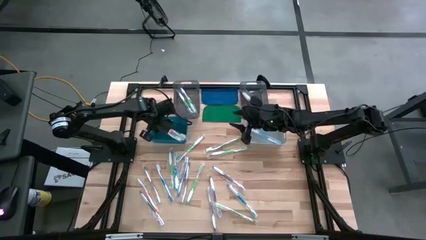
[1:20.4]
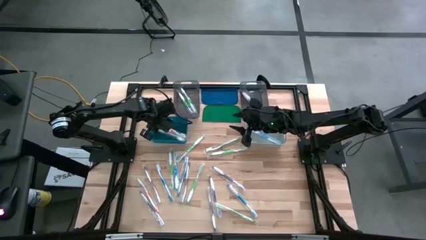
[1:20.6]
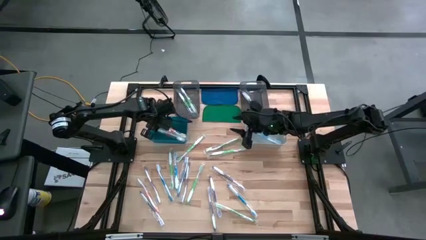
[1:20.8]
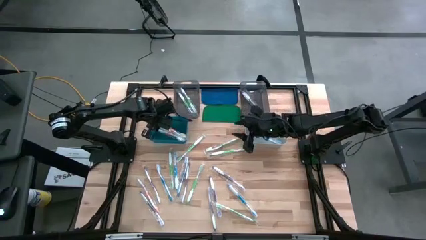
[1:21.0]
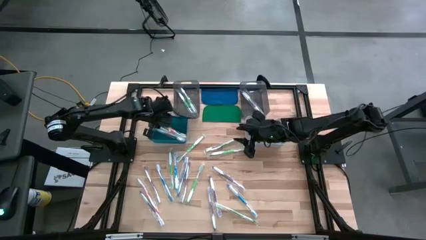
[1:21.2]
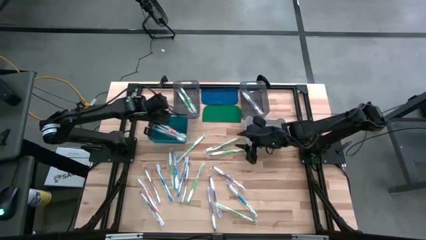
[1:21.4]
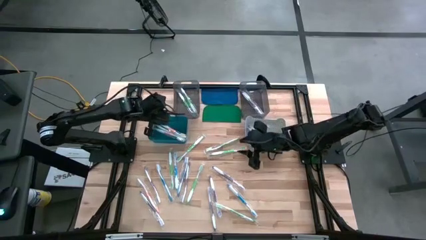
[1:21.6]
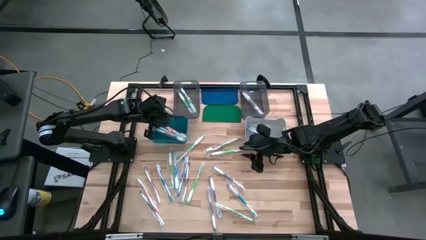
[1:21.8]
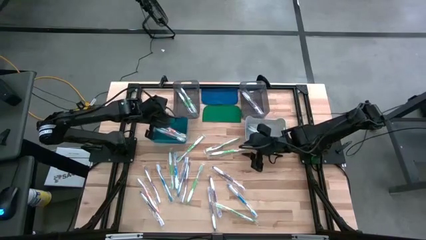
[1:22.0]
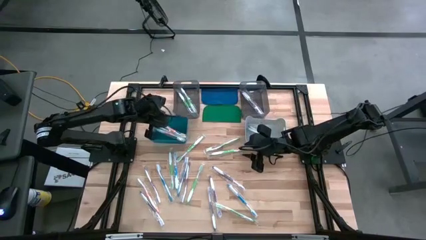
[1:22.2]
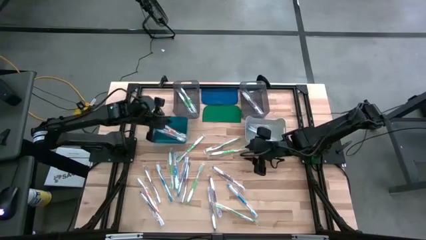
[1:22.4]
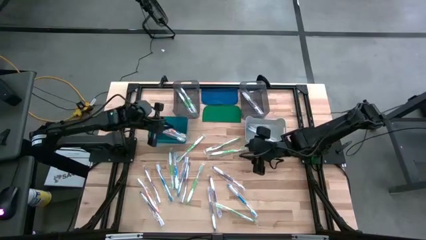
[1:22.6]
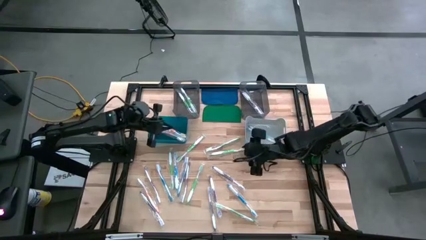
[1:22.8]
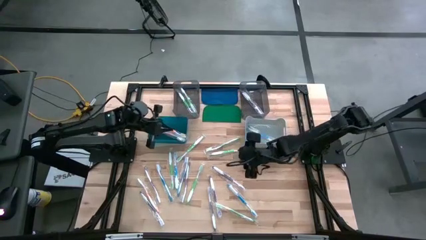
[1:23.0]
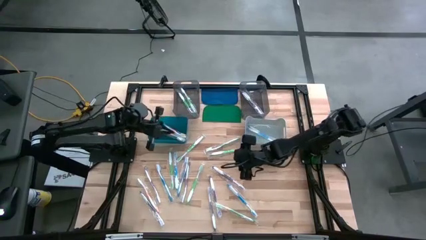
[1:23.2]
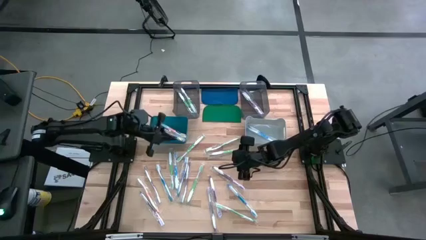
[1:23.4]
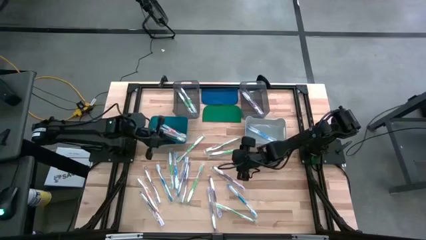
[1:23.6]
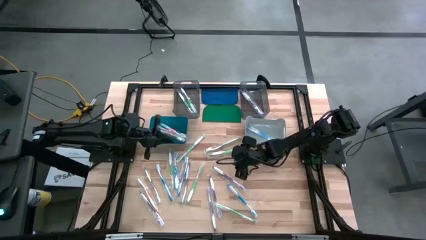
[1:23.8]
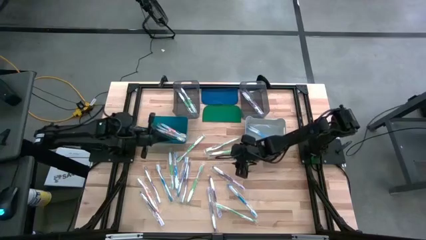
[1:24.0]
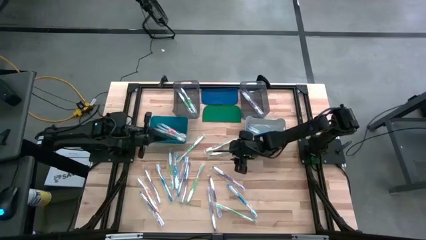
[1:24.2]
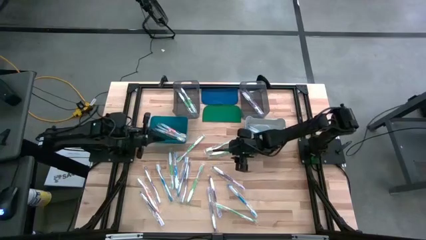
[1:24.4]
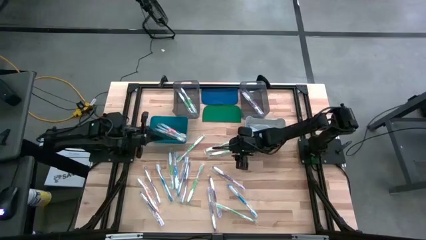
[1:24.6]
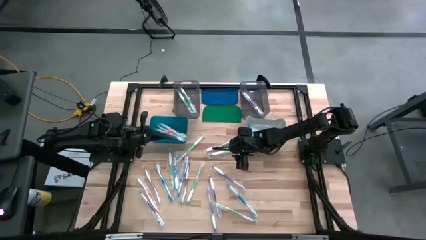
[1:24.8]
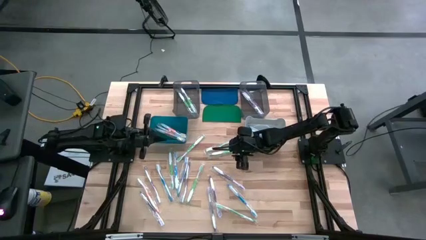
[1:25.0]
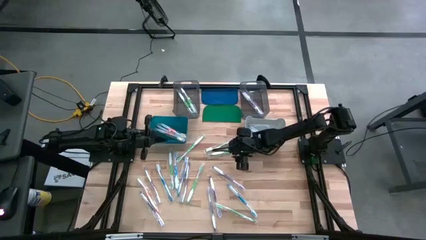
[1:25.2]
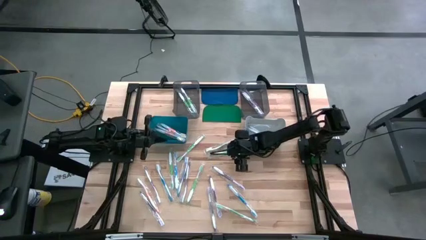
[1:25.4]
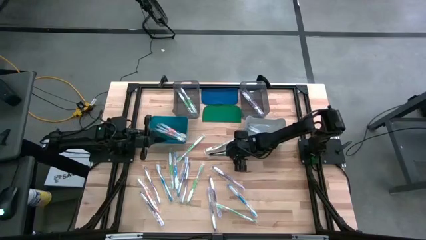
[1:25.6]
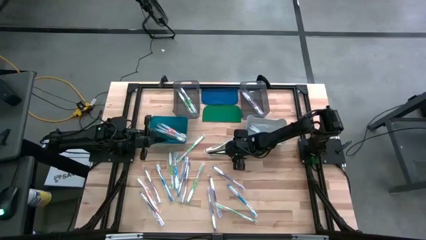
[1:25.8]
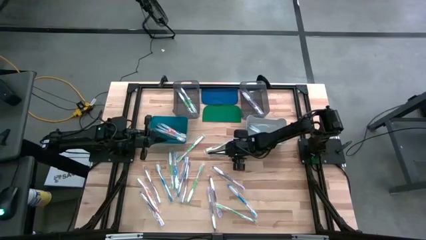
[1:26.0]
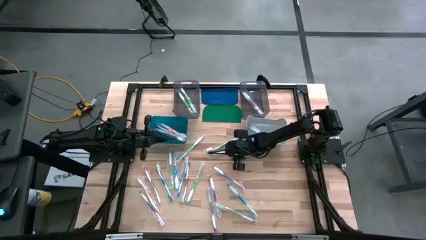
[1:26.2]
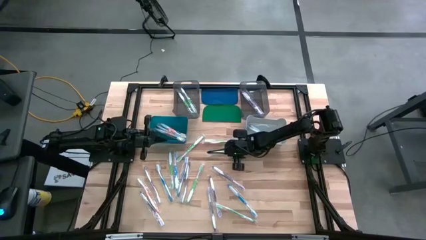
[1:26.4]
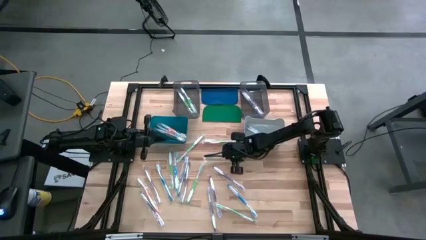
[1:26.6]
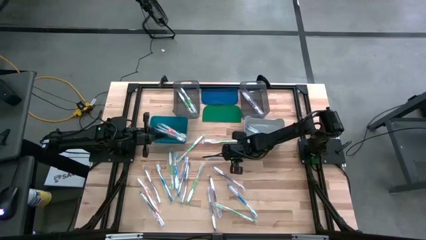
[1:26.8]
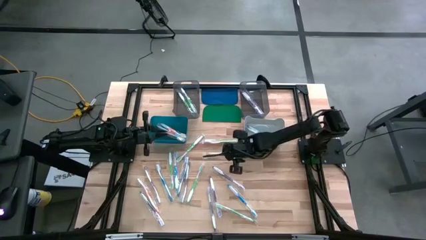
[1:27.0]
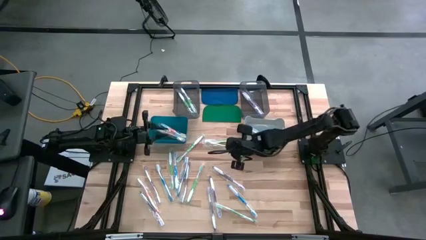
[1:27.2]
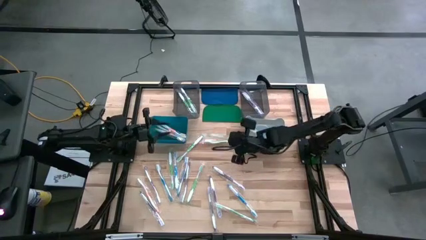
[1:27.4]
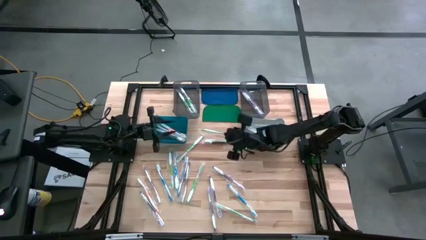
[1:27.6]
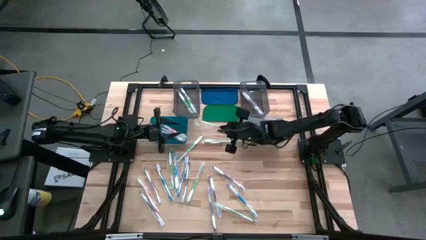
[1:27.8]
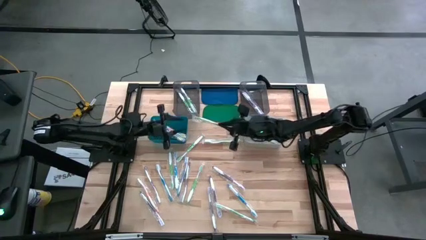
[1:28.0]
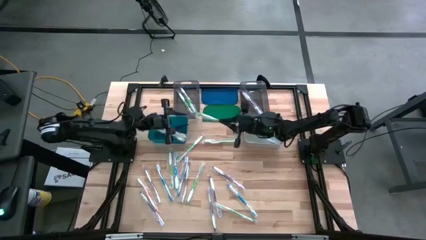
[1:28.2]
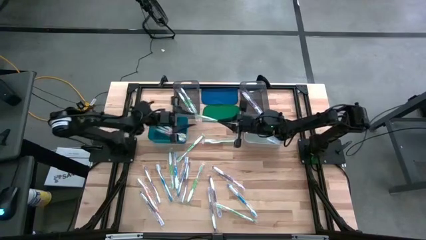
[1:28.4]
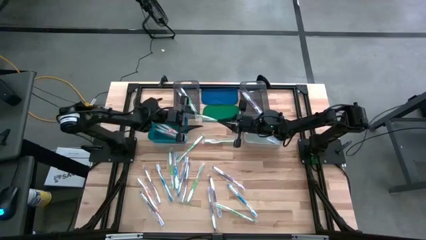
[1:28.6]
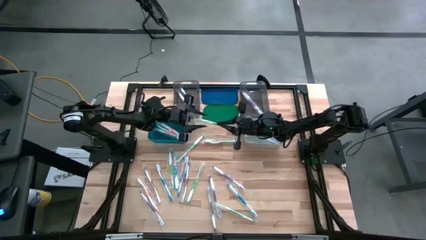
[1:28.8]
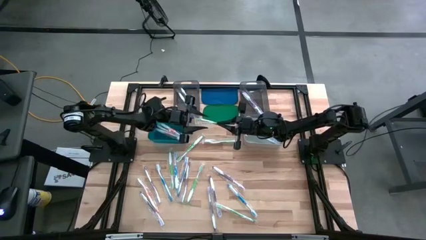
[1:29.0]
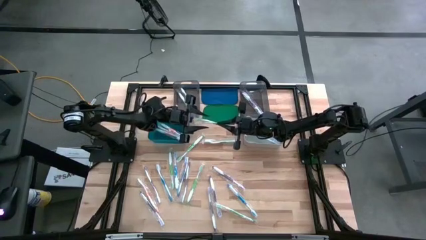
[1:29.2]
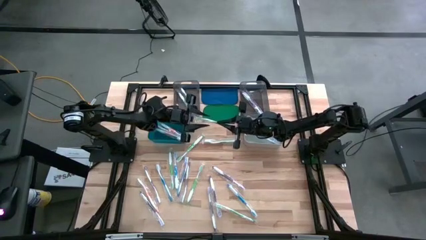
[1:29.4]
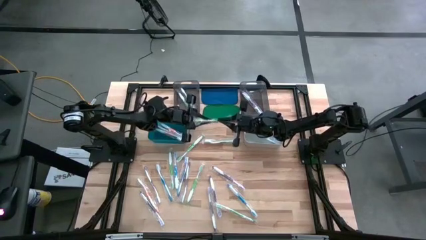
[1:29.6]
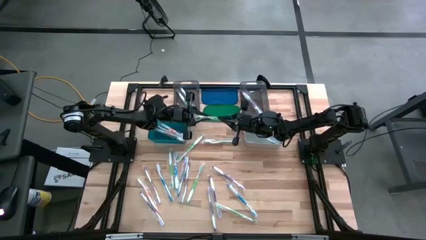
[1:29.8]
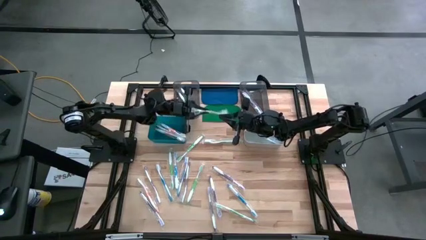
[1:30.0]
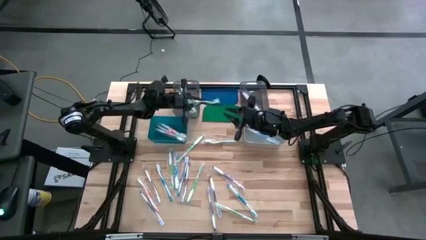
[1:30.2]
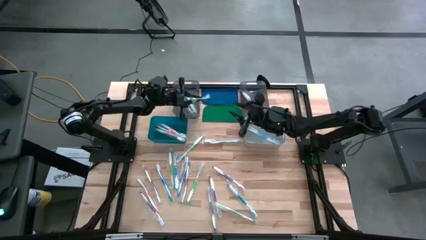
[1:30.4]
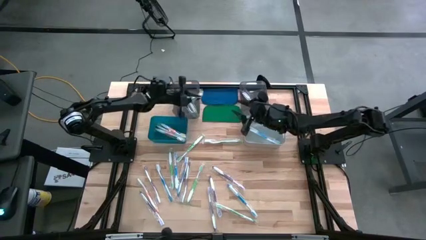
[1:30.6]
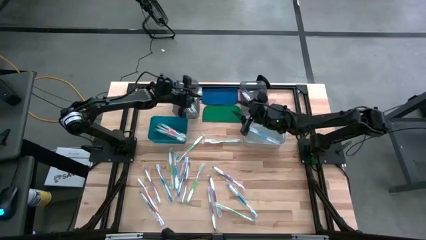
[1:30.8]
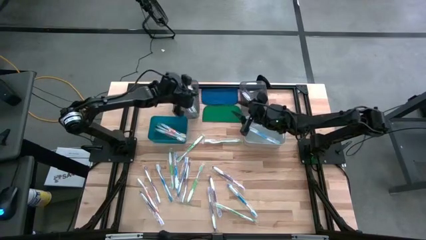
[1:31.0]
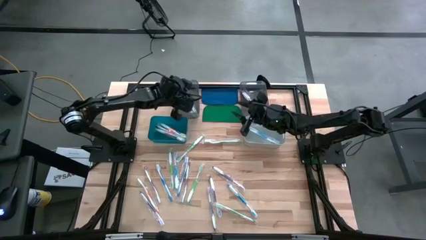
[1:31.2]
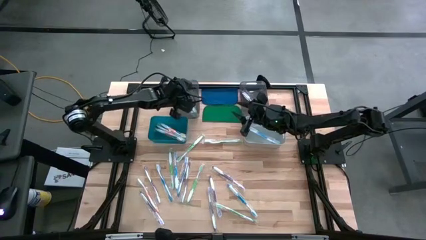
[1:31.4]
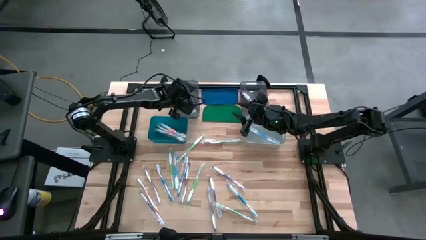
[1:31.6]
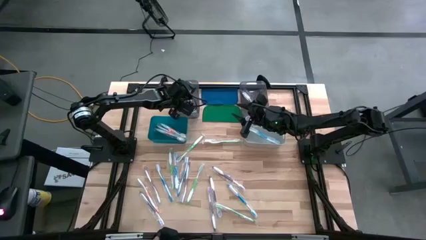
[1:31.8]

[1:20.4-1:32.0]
Task: Pick & Place Toothbrushes
Put the green toothbrush into the left black bin

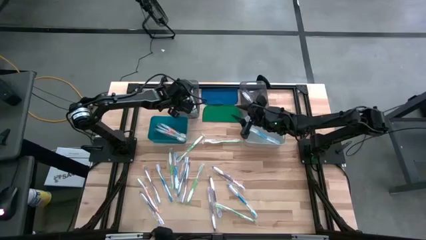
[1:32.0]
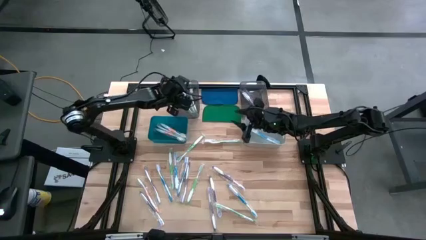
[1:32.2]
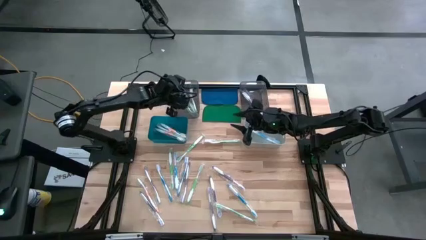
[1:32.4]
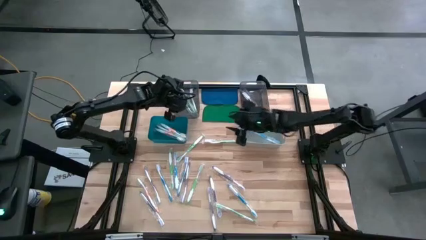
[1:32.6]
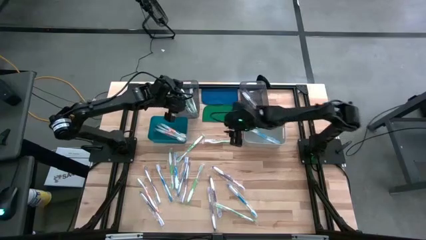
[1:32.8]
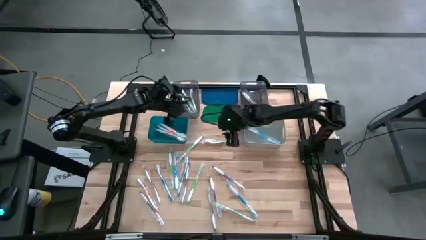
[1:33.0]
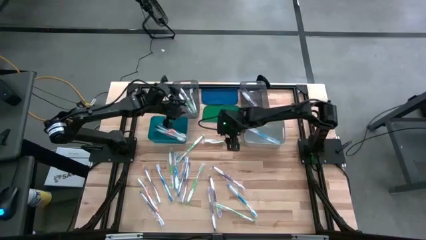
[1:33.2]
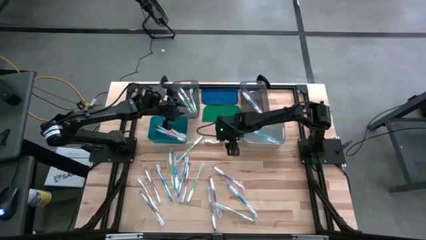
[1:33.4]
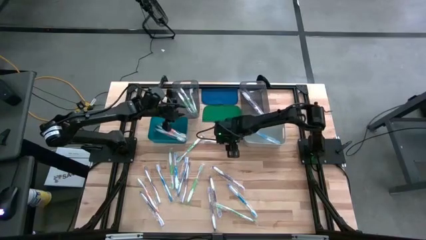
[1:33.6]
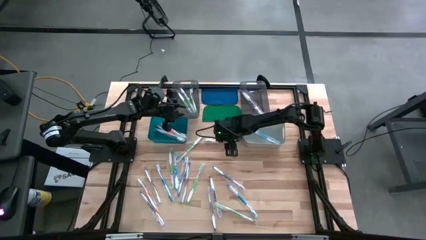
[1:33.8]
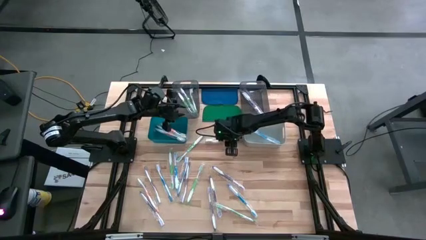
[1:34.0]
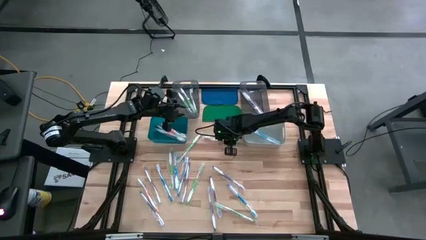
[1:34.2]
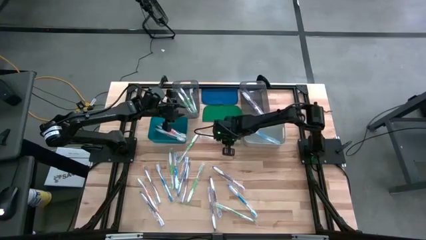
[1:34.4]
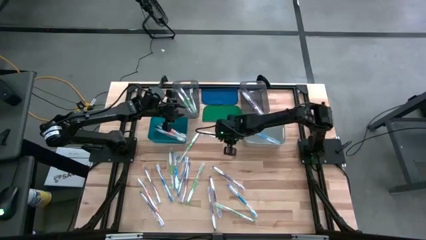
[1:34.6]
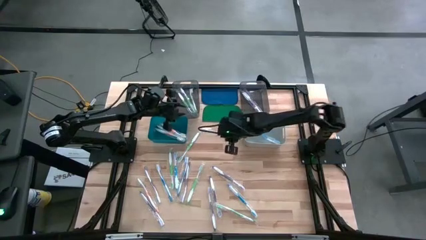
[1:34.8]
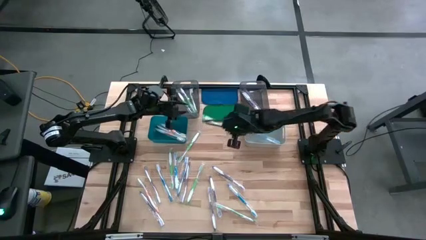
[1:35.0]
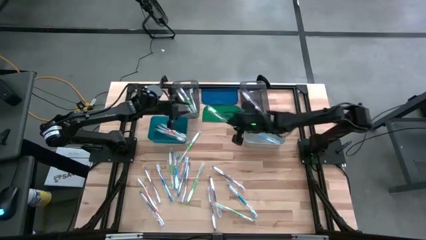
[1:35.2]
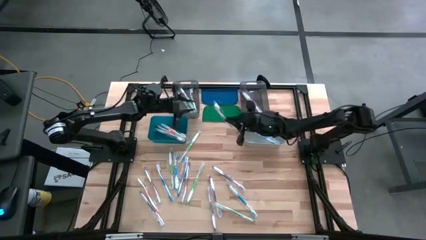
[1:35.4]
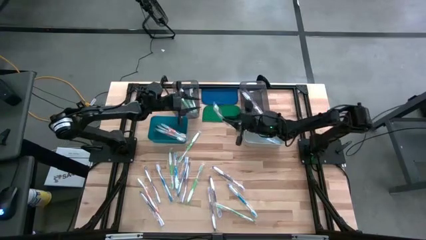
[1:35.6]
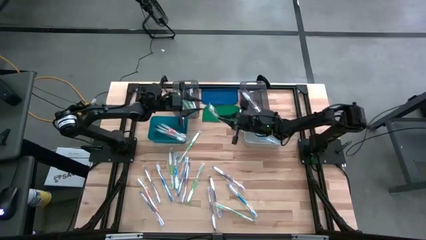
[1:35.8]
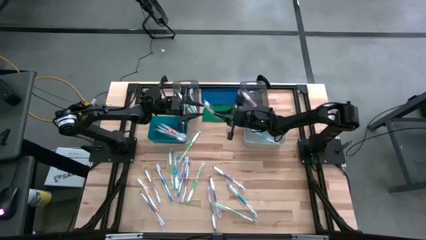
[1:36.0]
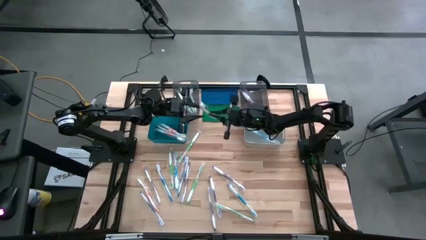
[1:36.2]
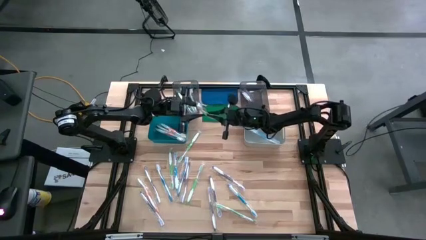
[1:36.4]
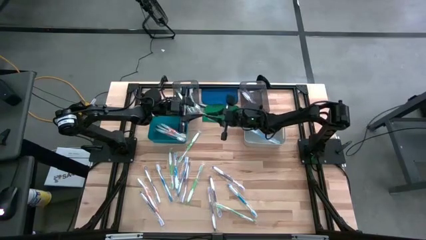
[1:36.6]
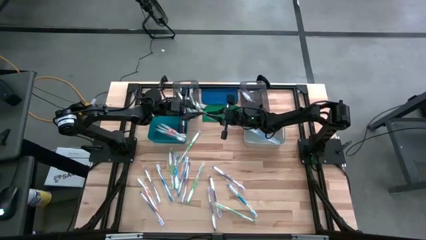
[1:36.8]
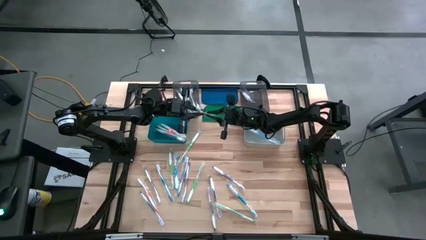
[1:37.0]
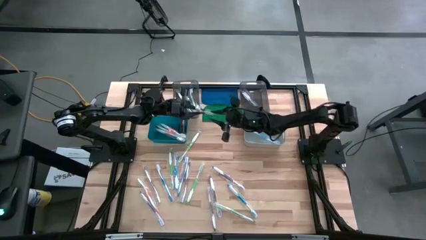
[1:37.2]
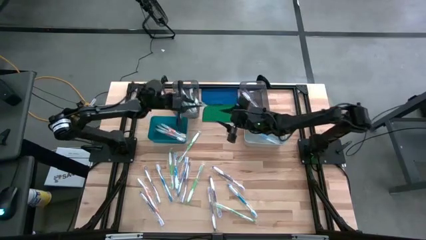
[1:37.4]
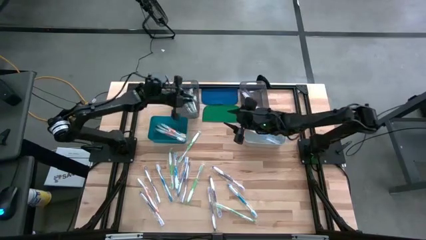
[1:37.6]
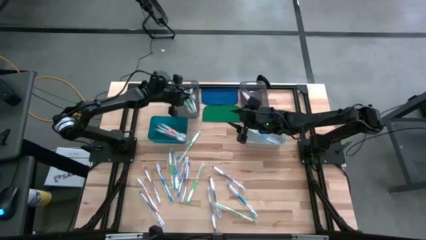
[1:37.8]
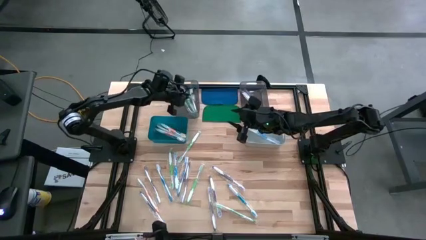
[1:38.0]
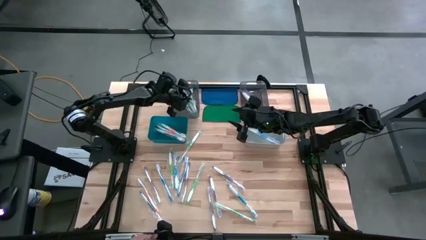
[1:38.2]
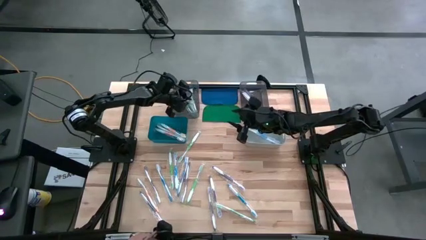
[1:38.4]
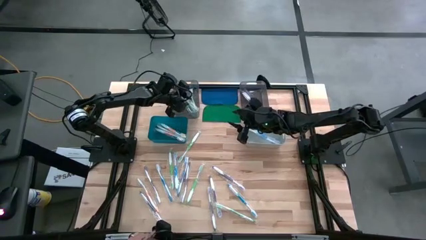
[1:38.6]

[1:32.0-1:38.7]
Put the green toothbrush into the left black bin
